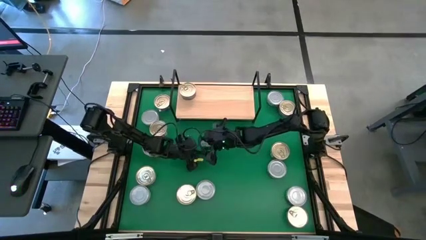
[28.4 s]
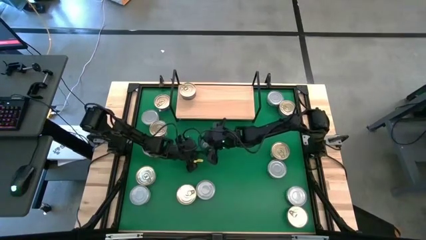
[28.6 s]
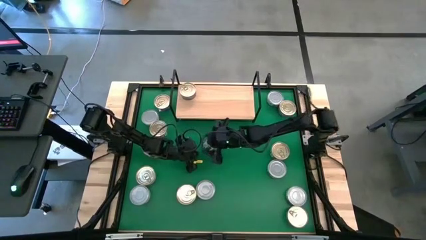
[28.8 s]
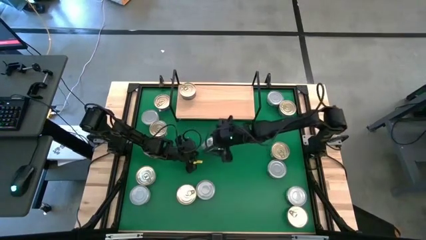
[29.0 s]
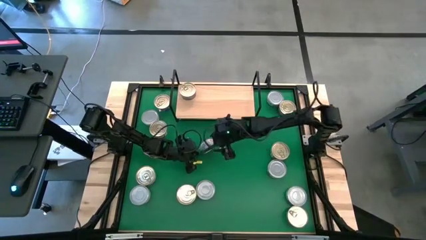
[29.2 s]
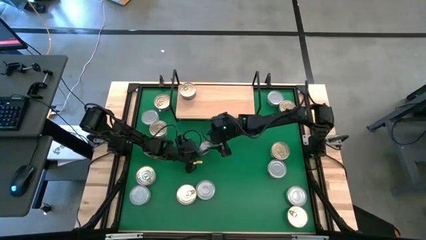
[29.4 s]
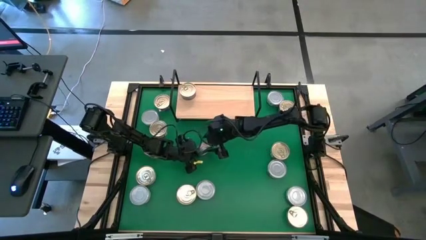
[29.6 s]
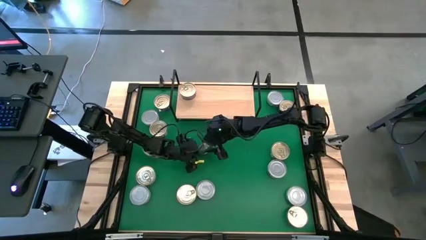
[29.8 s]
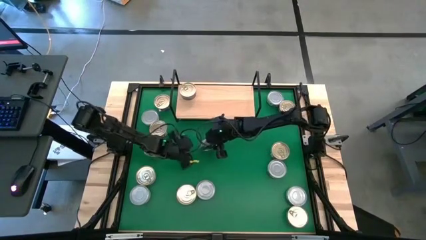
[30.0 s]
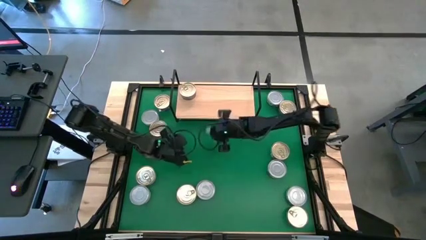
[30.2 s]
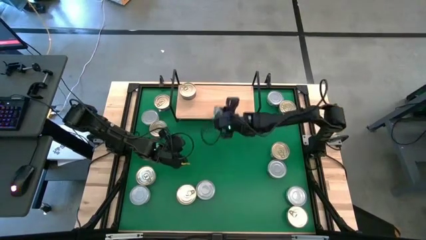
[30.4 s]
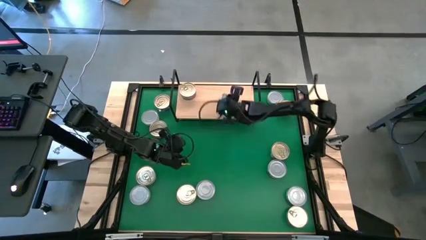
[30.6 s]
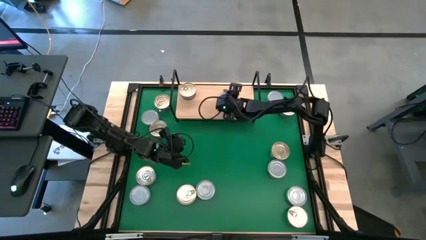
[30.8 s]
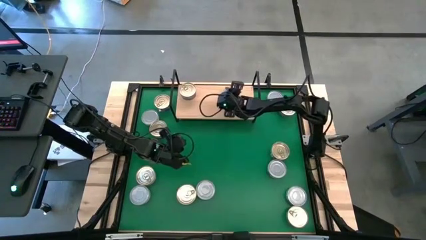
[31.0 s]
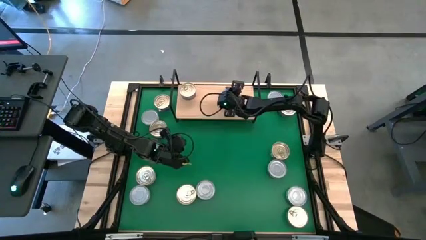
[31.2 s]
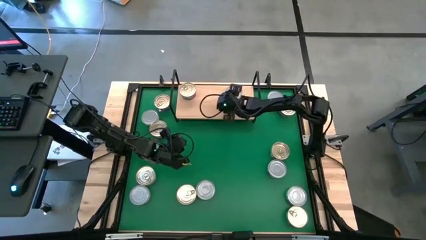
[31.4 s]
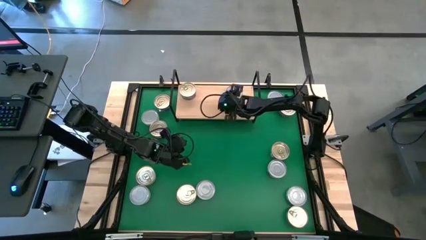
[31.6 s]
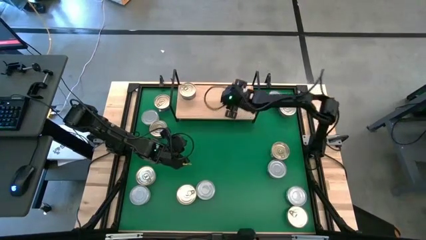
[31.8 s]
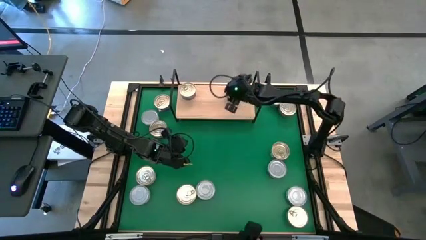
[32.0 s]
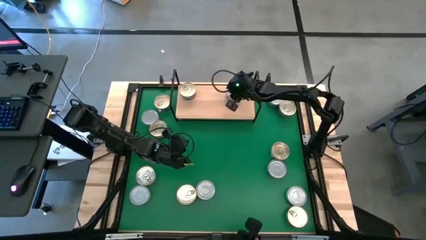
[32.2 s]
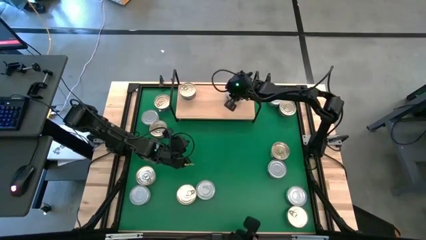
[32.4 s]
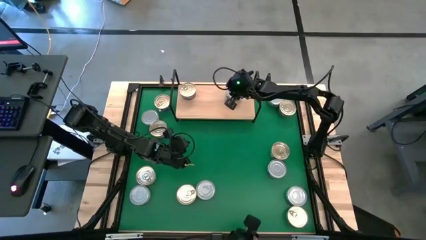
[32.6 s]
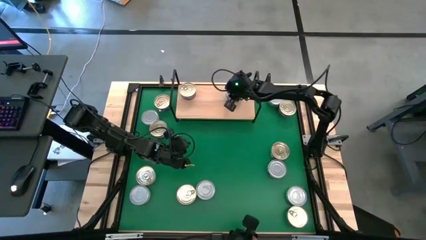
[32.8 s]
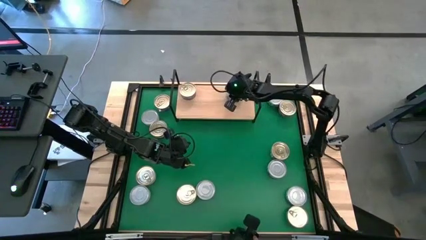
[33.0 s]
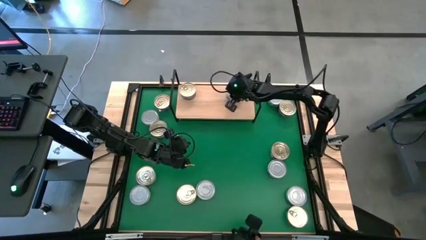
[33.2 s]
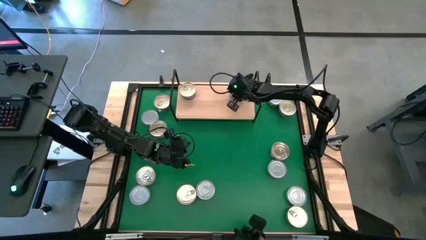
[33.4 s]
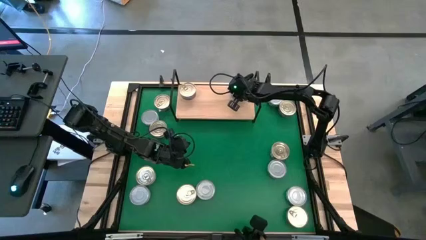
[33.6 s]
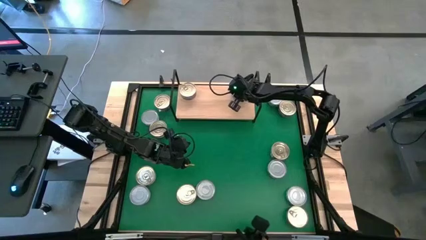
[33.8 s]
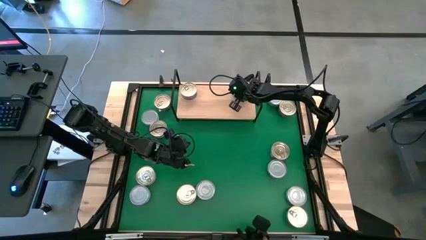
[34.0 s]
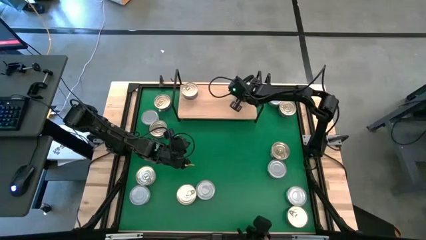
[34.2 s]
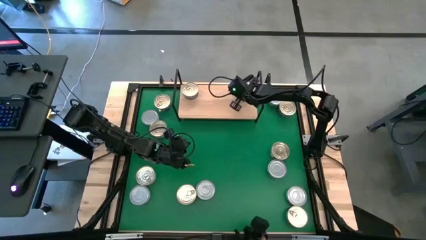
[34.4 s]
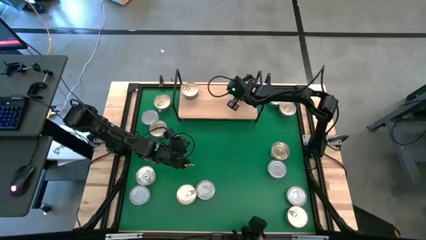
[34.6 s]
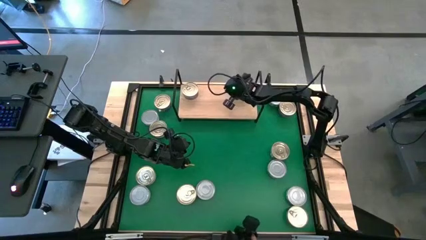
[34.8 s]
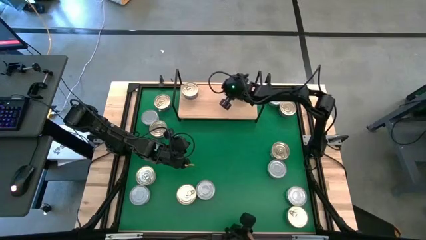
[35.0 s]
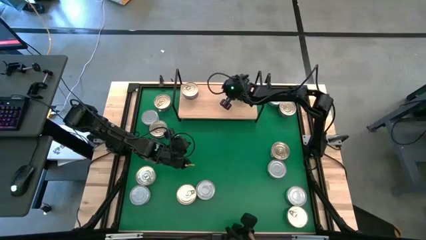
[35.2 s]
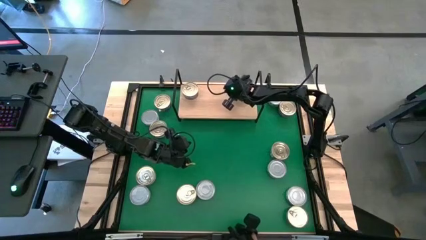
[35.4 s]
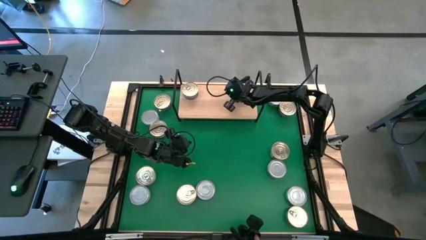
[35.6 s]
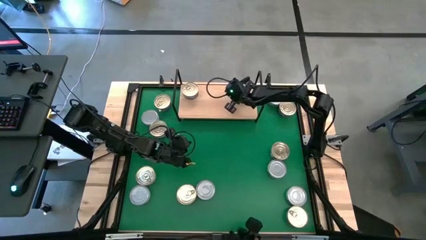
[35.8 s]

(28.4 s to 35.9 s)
Task: Stack canned seafood by type on shelf
Put the green white tuna can on the shelf

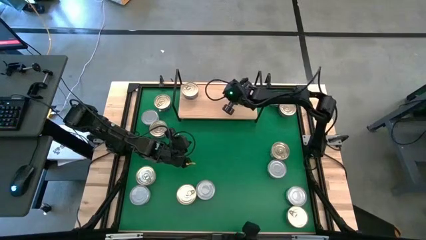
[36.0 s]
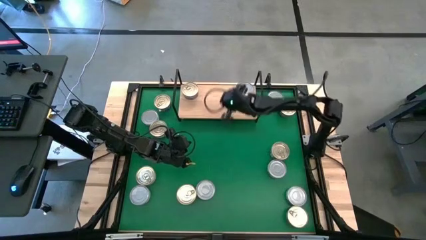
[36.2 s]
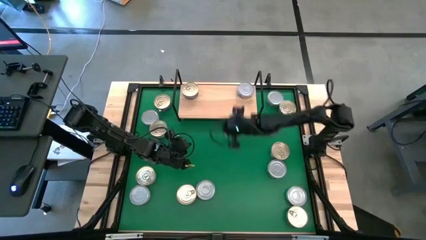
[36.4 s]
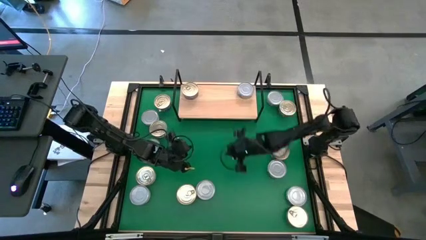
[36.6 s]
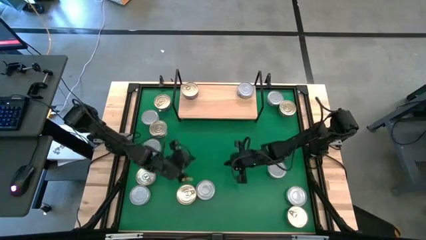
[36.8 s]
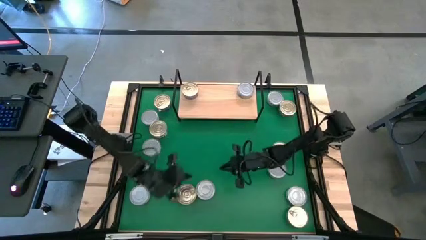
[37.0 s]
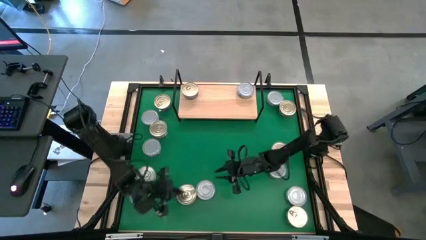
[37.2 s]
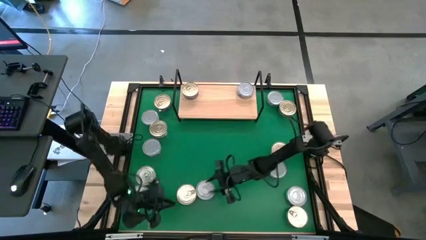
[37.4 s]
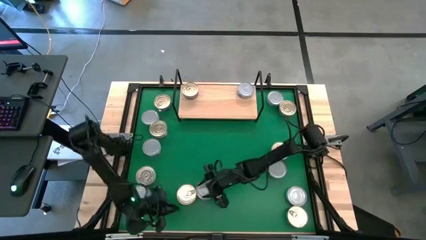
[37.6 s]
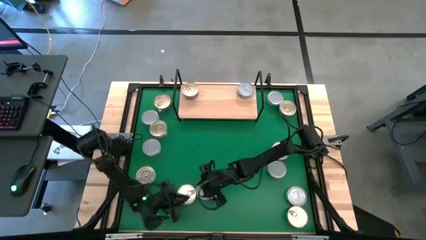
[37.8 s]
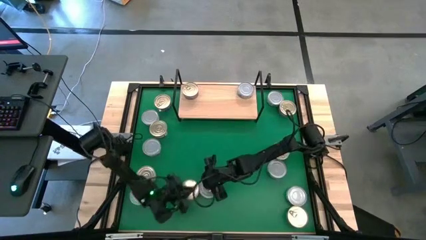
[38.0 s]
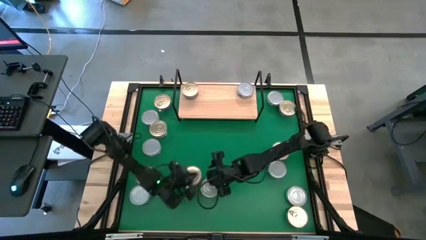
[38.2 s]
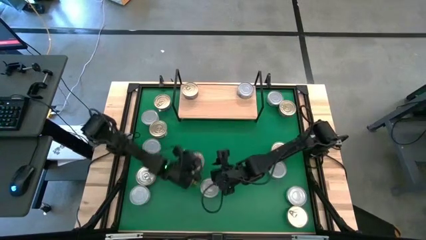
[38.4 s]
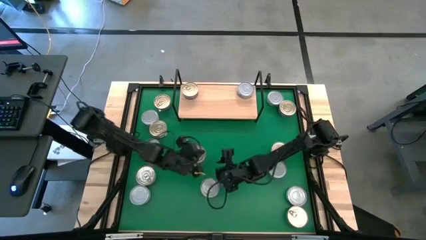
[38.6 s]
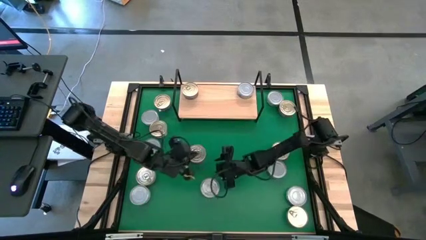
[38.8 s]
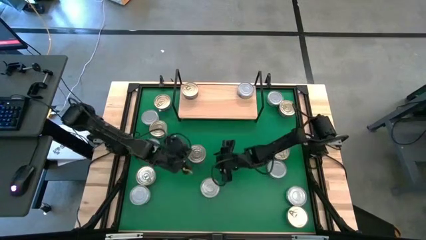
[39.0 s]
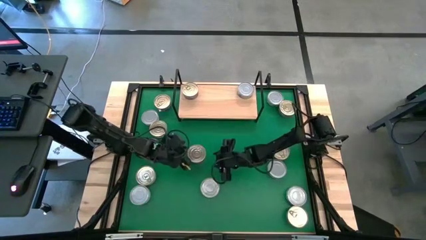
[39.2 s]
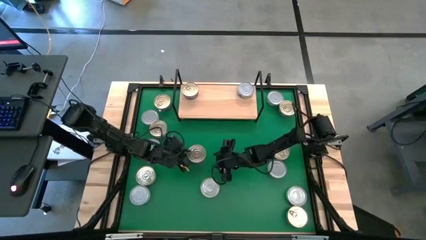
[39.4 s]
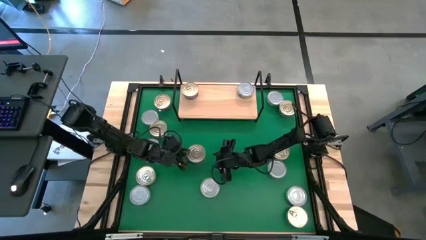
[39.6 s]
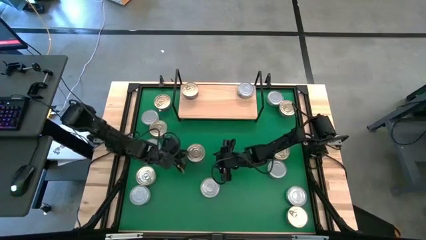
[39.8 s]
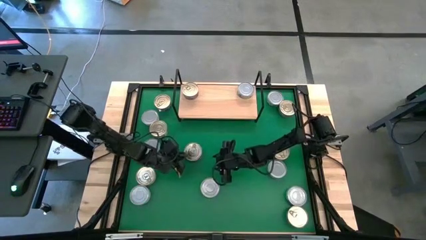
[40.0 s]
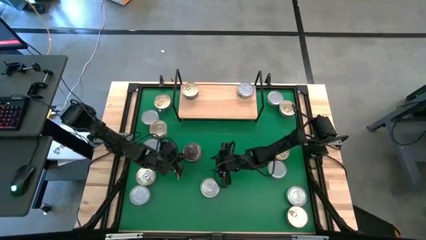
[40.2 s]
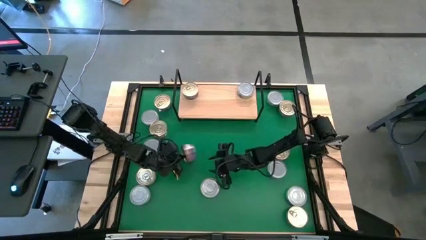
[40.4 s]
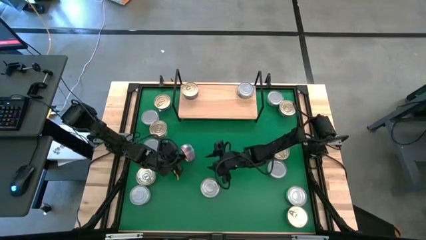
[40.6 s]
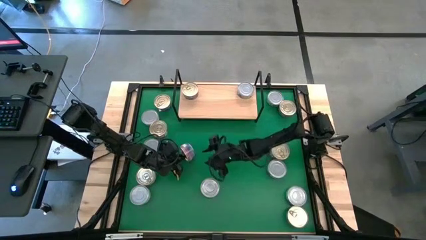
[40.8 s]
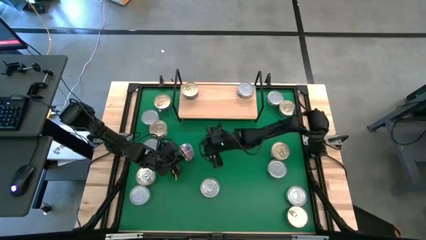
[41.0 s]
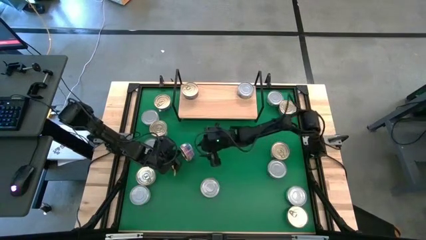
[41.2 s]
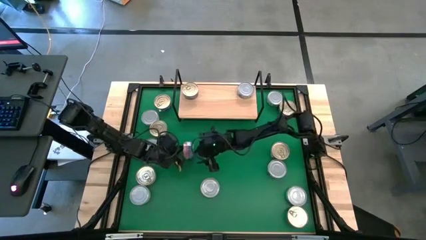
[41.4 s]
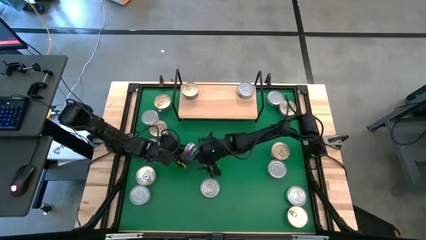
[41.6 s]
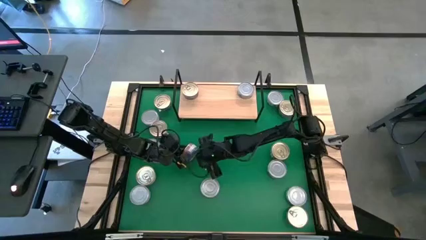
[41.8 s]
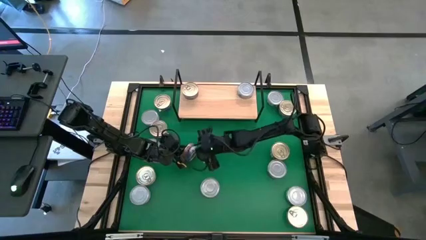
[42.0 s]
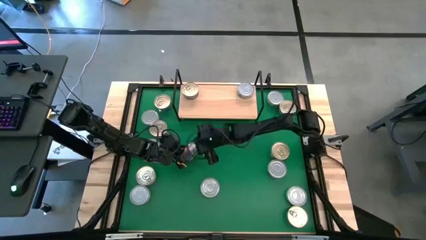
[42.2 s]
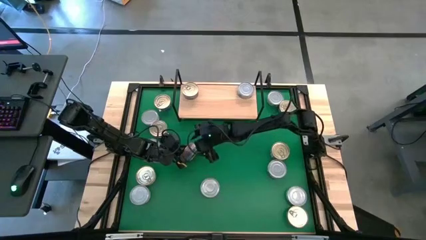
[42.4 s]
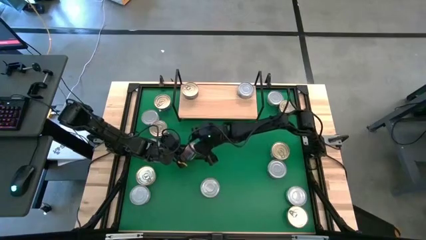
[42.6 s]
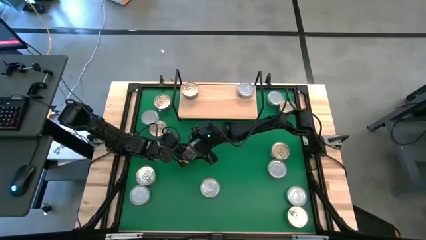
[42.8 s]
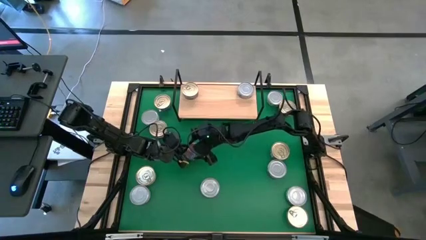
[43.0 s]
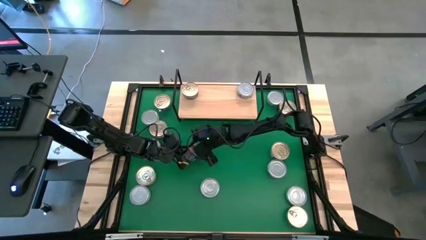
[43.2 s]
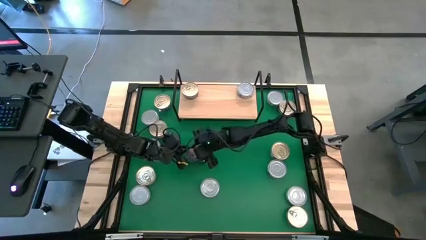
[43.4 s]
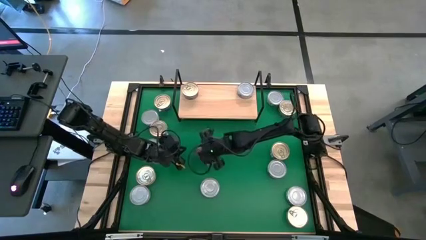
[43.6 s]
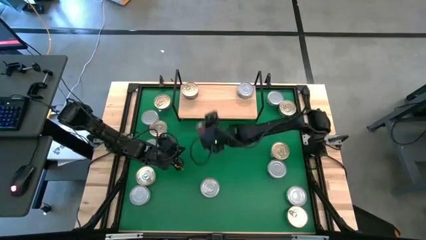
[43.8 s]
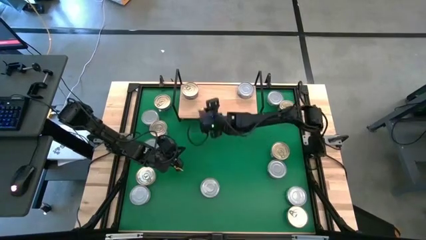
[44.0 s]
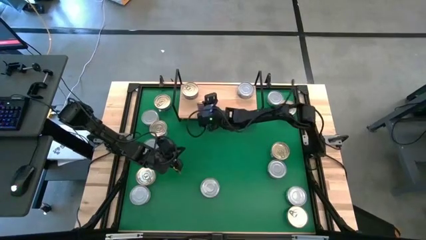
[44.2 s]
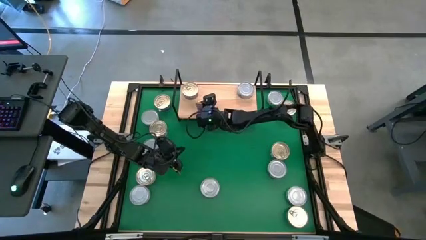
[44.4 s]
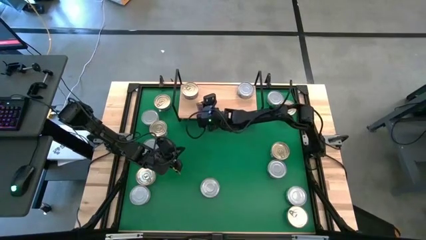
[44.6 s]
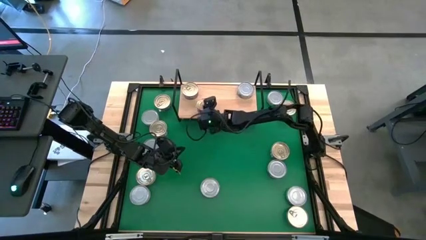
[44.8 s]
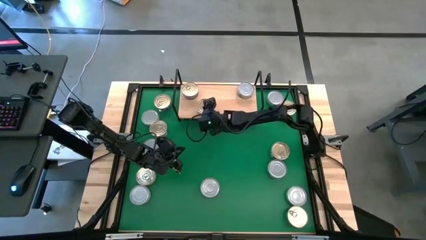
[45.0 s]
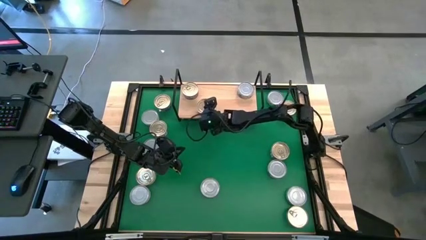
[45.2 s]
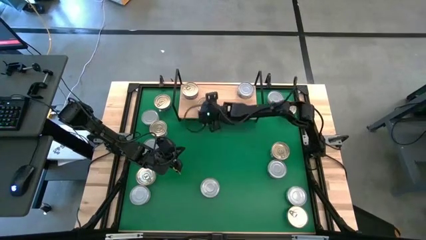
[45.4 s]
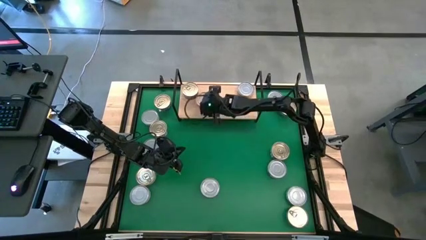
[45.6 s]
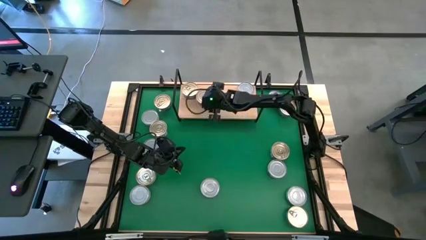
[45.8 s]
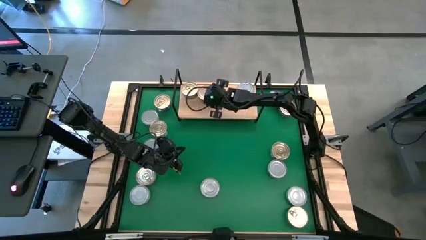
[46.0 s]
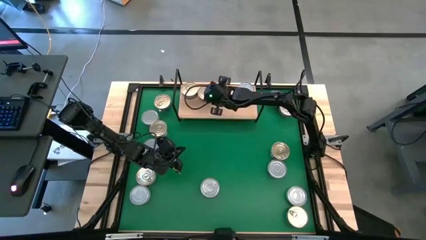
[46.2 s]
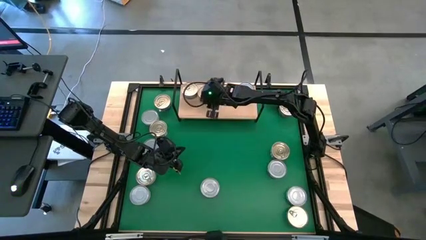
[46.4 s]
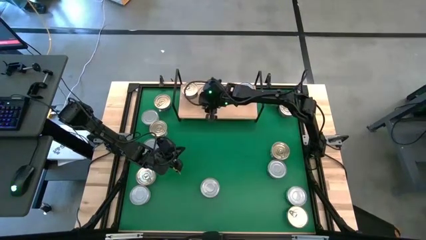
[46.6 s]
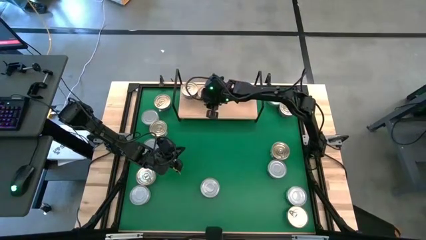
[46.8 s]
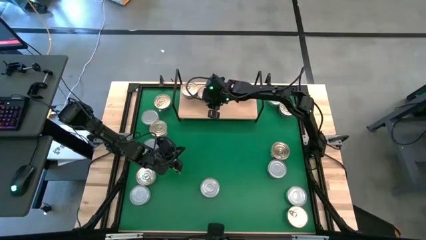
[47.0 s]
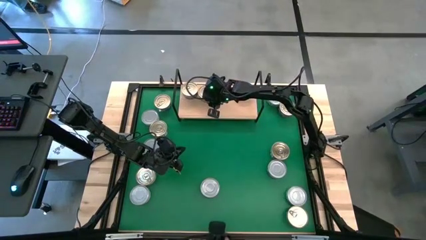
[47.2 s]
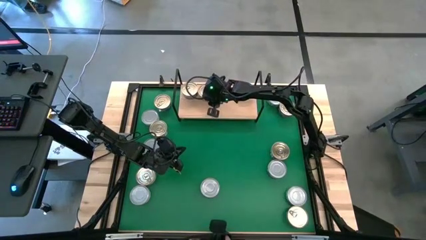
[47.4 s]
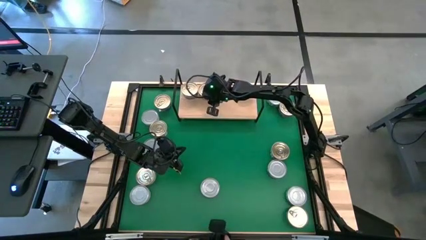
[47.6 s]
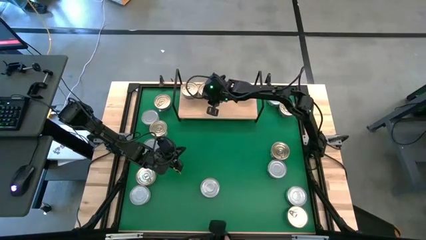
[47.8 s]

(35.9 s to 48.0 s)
Put the blue pink tuna can on the shelf
